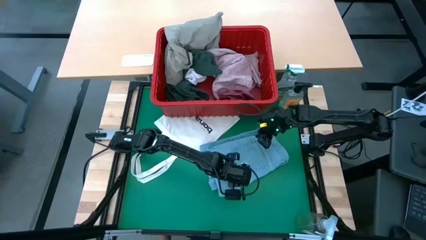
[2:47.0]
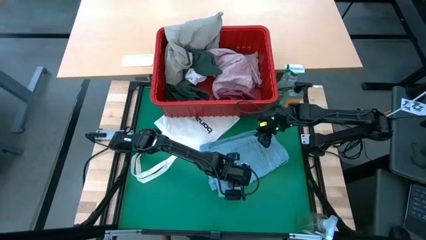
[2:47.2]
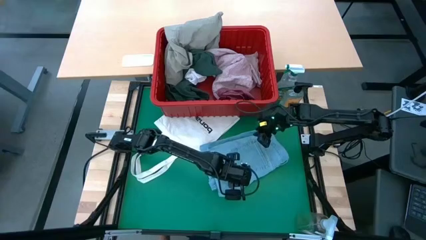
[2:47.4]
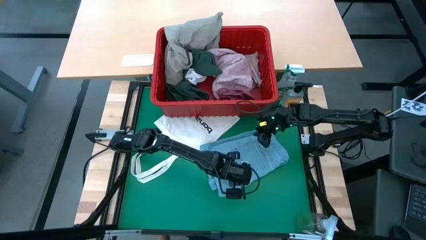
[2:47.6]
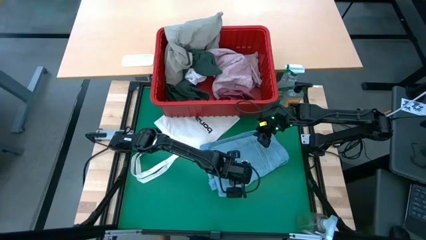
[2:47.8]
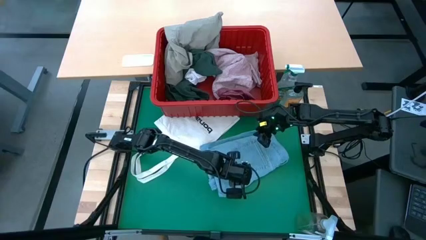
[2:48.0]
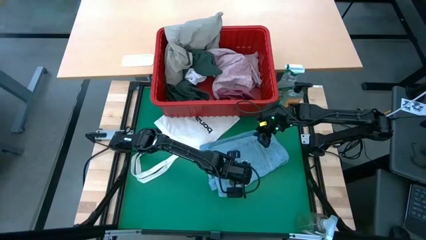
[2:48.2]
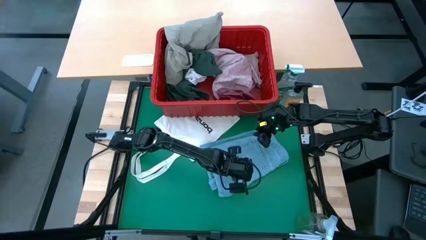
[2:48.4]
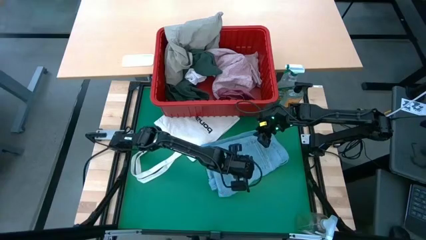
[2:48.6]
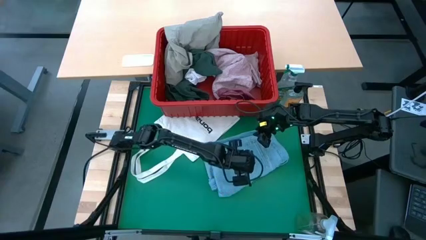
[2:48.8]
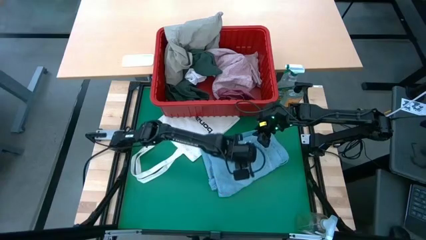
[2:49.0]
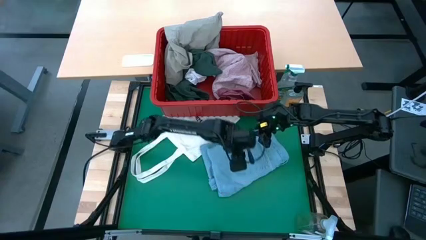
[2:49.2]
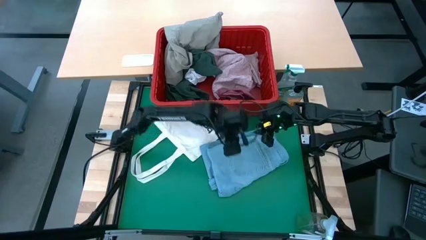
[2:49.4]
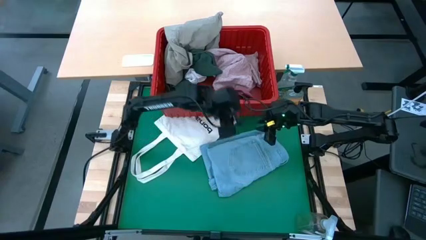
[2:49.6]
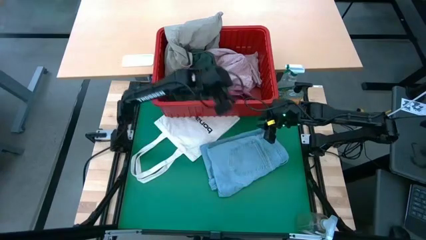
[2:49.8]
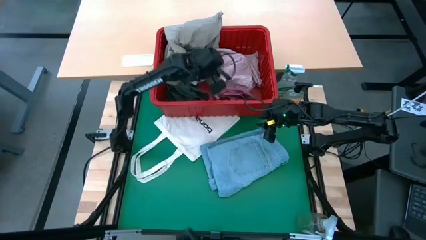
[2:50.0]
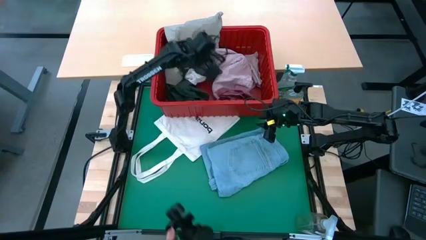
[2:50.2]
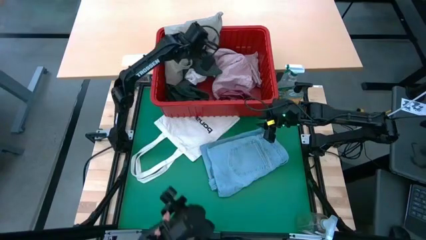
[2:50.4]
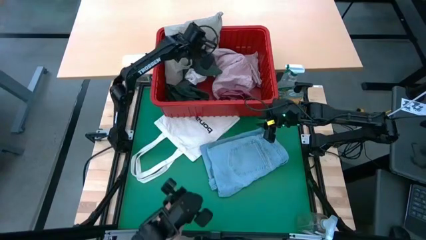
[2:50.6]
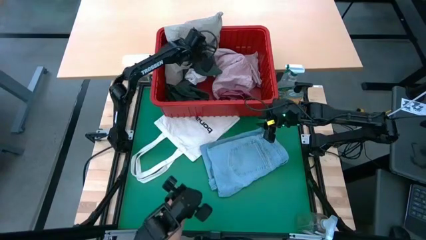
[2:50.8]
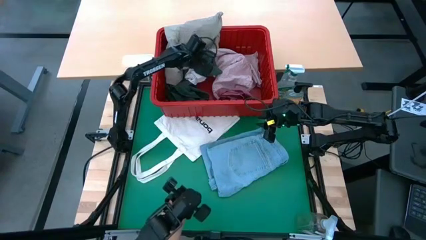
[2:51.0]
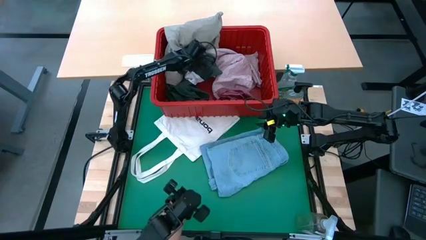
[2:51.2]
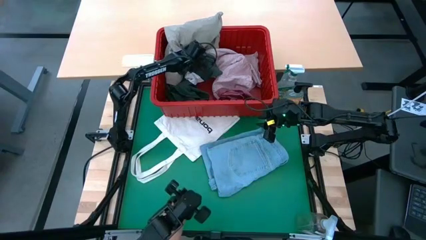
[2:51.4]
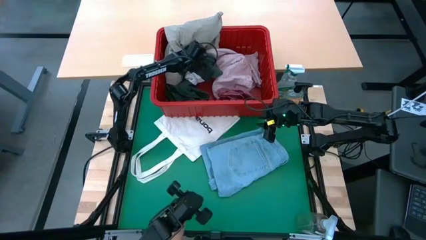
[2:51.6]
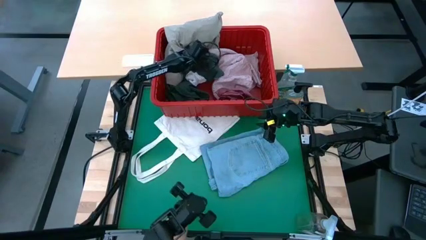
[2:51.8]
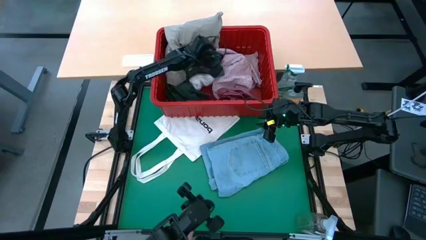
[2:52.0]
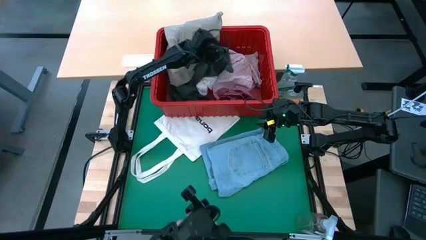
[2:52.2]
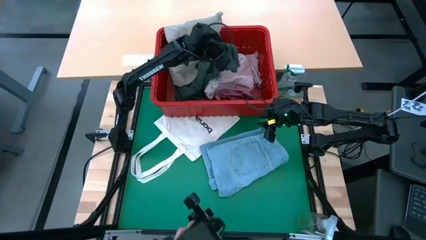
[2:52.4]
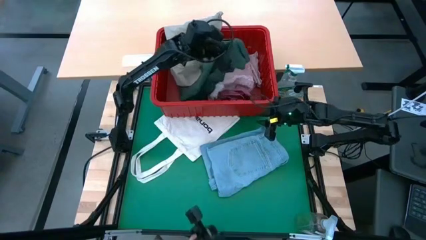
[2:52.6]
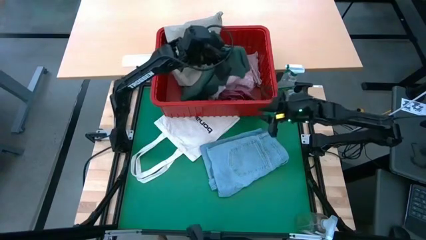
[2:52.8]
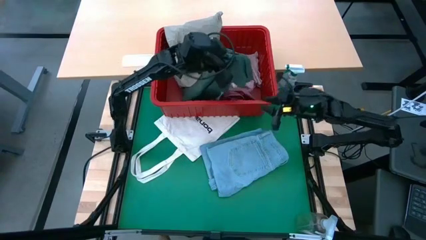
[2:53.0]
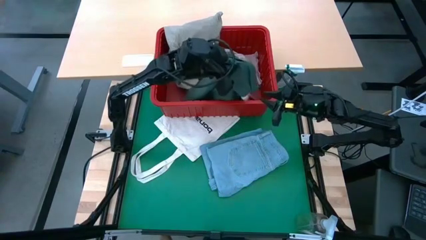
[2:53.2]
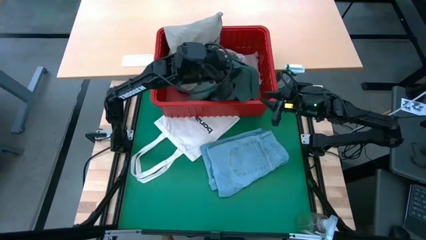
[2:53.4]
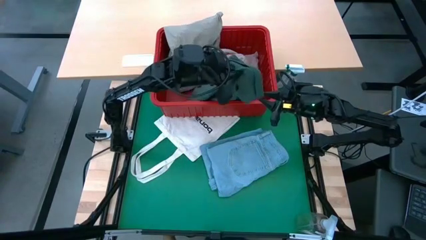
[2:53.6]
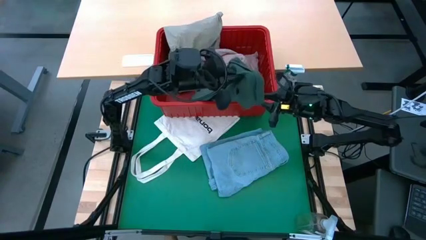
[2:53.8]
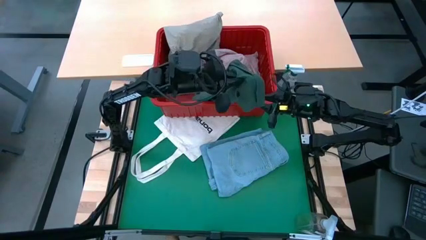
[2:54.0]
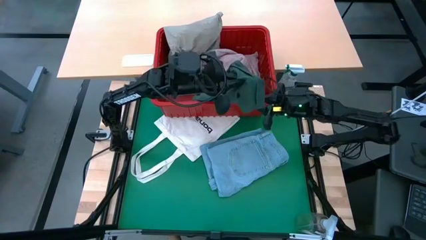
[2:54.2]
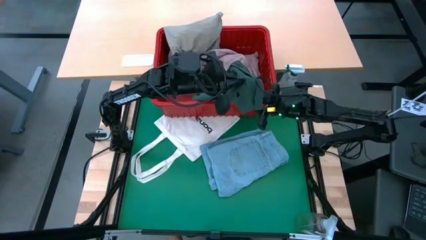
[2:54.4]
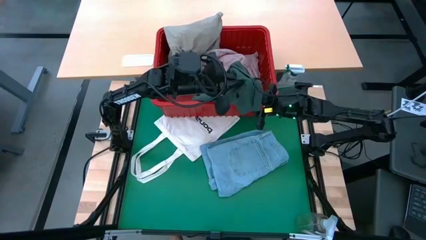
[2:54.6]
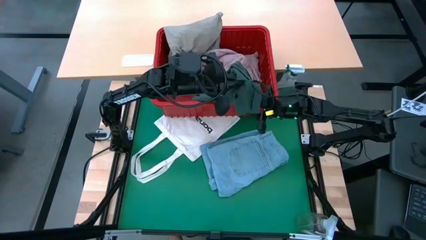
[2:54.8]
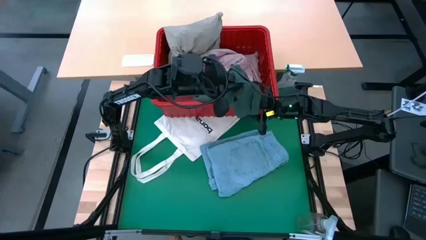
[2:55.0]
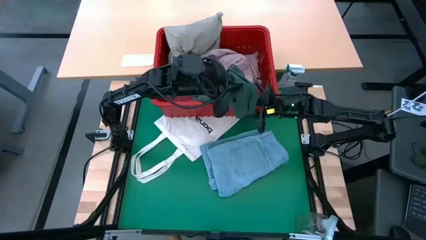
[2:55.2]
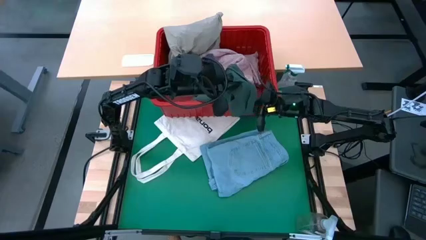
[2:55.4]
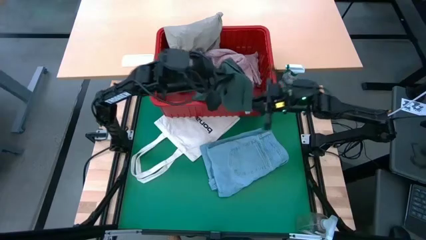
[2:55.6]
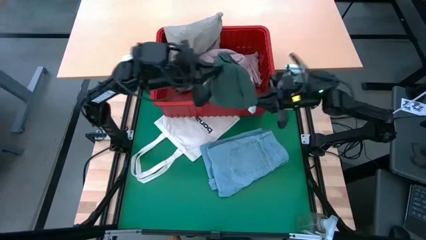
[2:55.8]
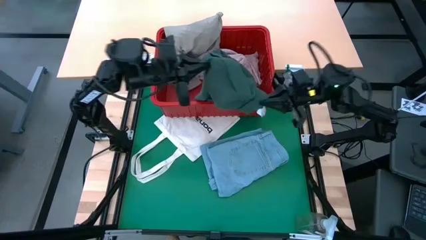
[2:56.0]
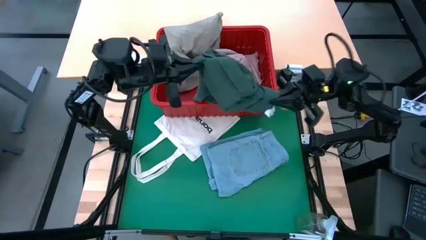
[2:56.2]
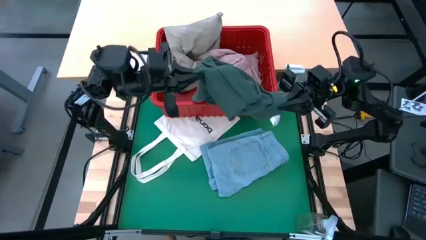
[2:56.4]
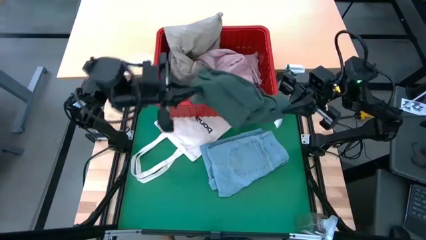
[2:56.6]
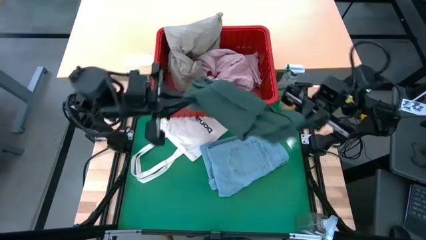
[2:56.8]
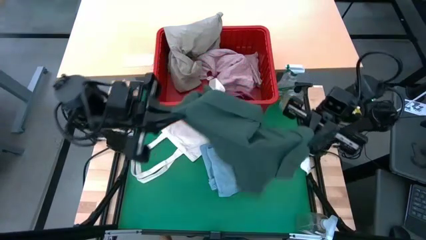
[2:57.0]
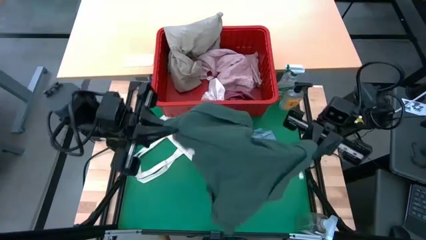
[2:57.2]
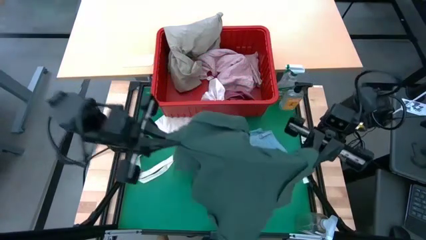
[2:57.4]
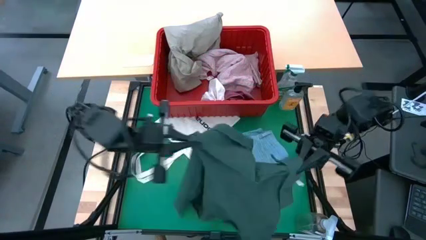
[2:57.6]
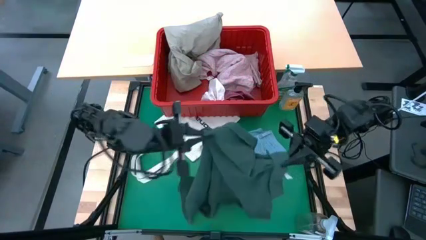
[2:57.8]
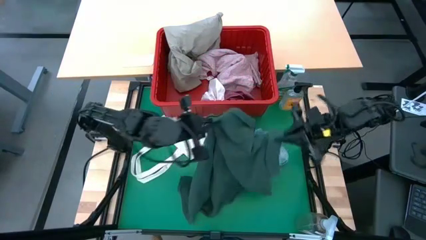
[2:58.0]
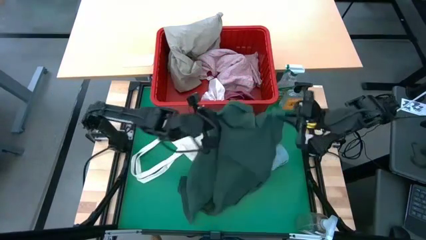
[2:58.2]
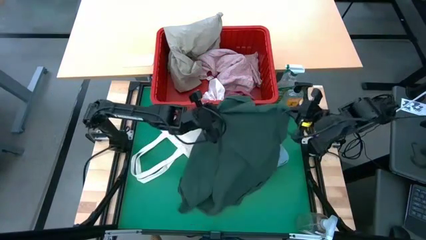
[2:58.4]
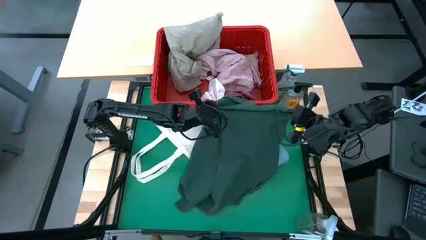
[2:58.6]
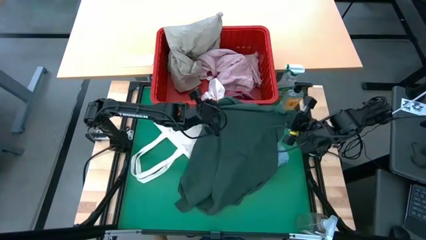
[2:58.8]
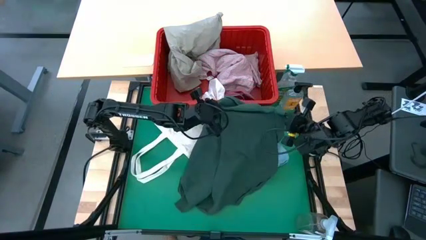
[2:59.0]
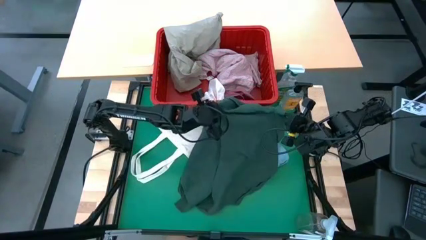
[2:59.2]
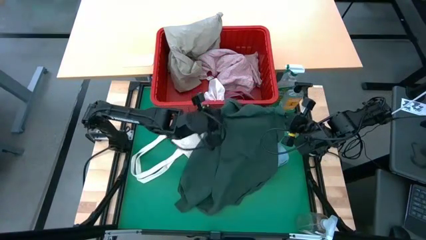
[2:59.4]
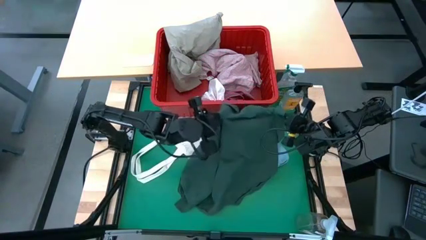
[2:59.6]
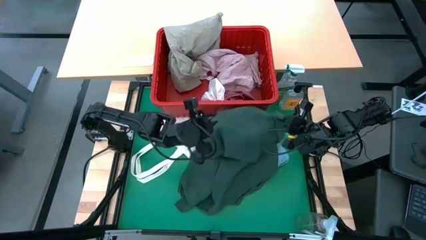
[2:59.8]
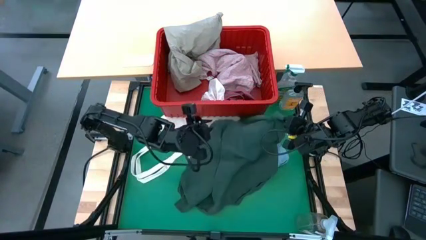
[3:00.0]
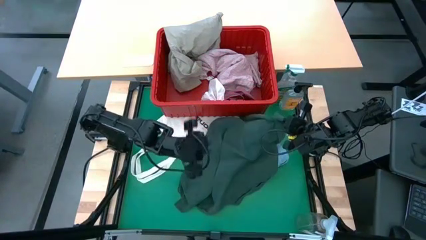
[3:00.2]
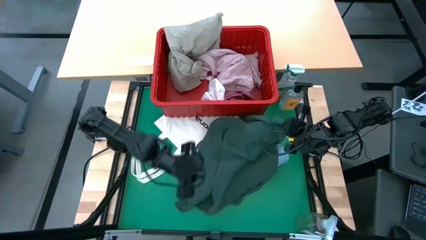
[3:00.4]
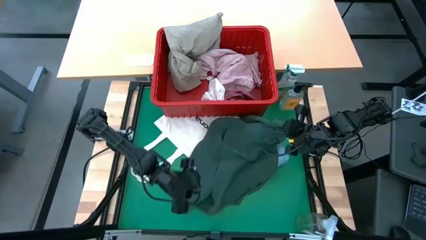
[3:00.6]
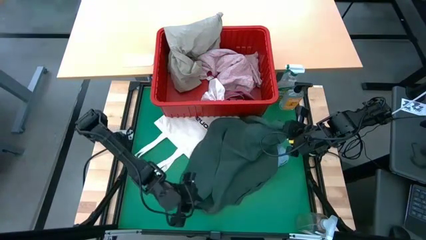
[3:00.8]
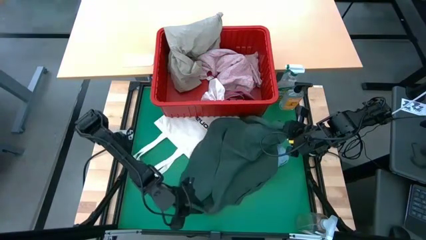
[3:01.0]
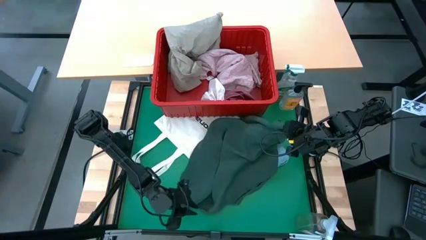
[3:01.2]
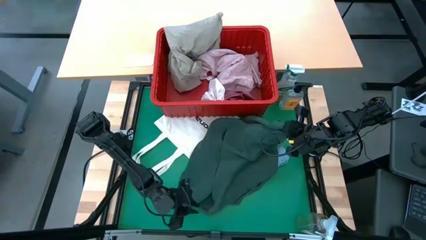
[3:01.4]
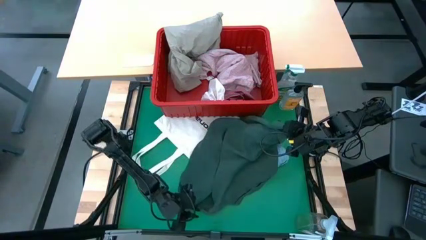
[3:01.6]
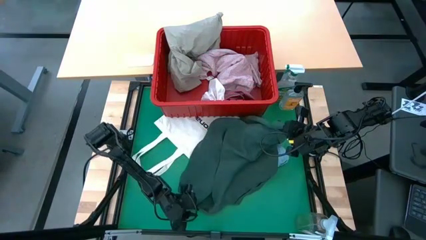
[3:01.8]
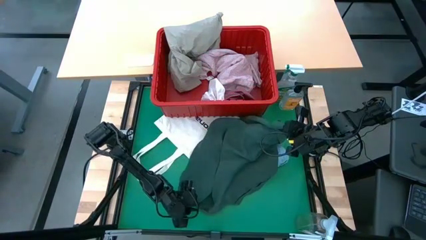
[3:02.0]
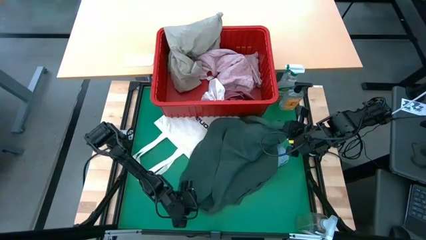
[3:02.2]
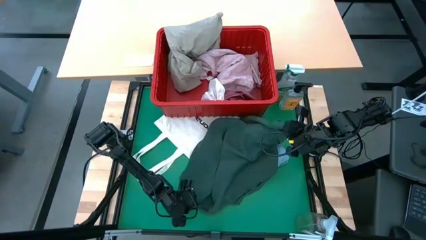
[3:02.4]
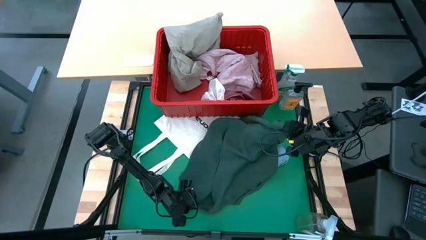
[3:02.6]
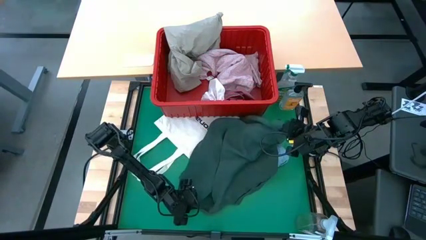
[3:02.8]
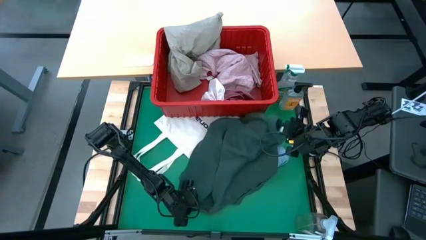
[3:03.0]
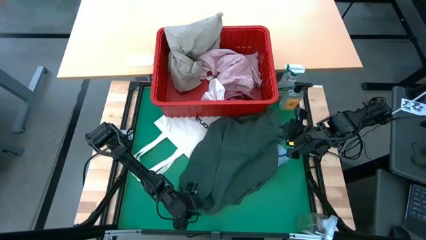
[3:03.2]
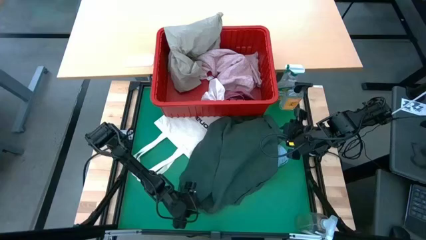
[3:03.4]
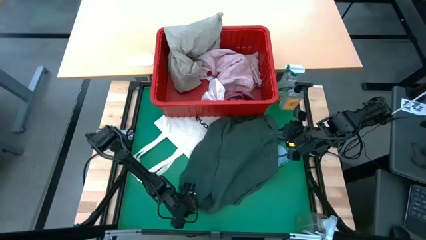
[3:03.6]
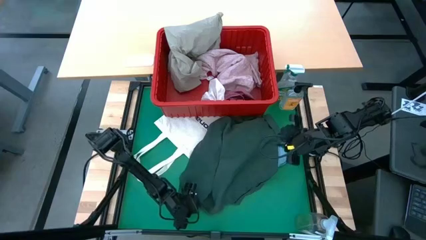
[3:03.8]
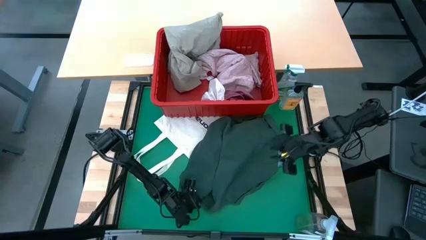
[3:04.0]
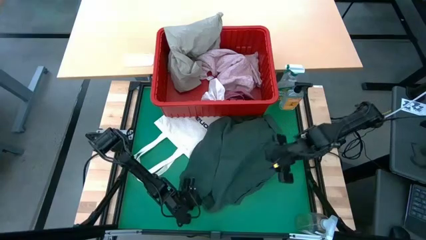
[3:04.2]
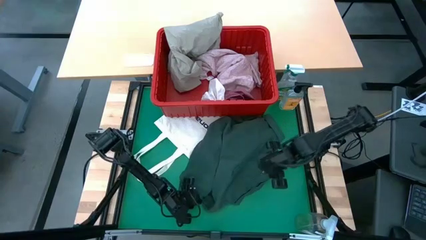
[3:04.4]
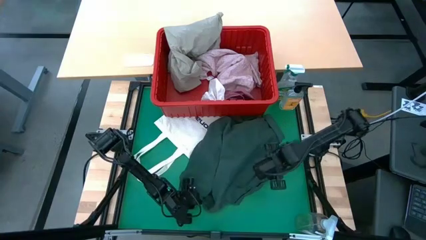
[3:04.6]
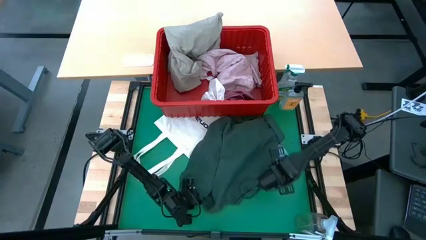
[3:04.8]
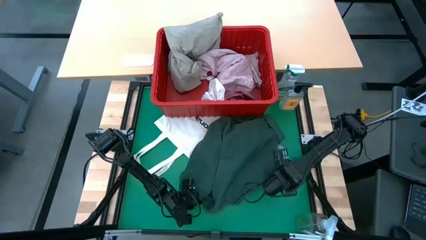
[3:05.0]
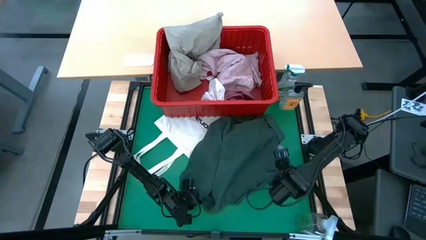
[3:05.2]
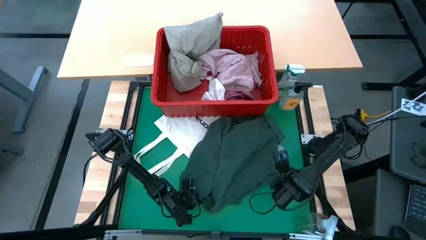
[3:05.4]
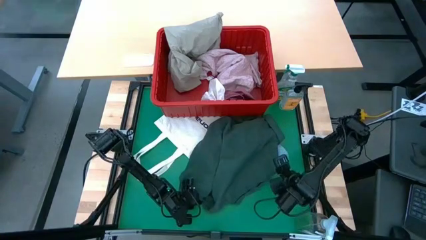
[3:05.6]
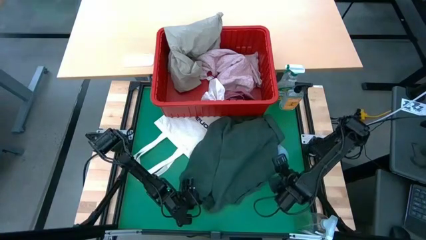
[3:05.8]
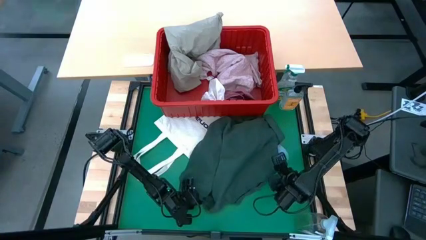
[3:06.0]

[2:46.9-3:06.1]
Task: Fold laundry
Fold the green shirt
